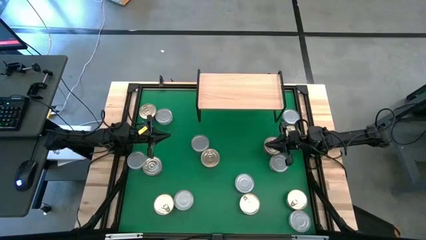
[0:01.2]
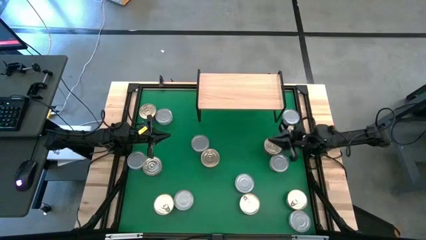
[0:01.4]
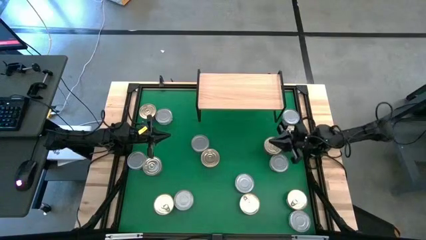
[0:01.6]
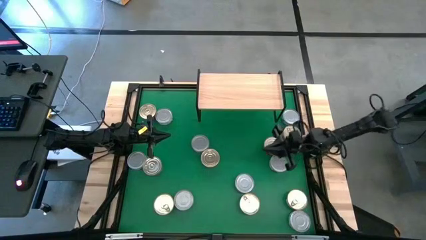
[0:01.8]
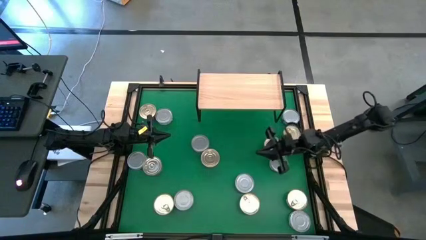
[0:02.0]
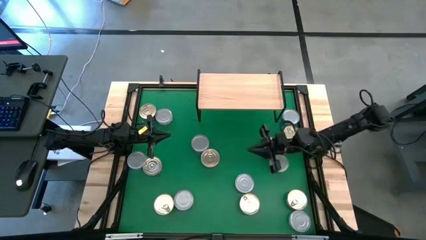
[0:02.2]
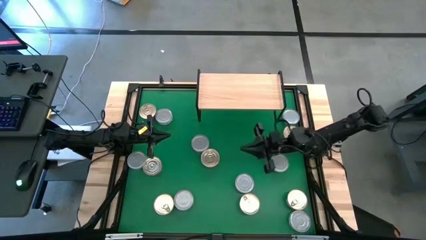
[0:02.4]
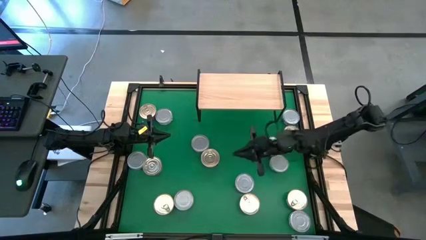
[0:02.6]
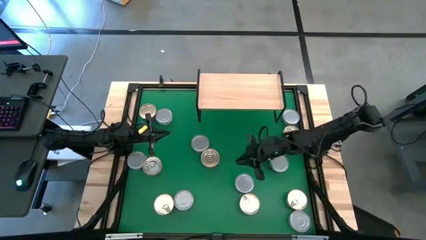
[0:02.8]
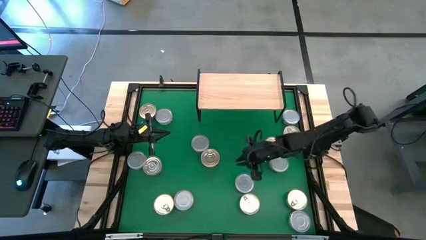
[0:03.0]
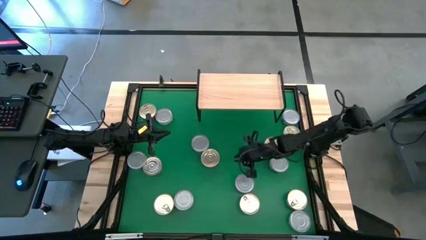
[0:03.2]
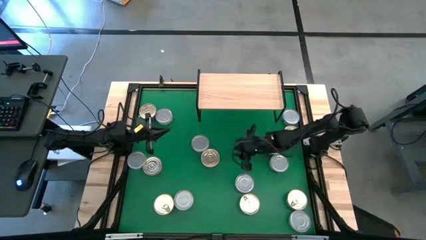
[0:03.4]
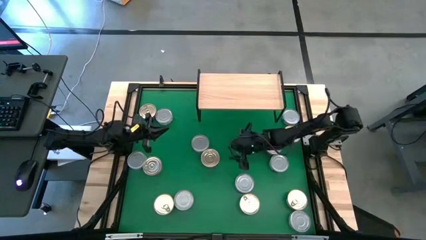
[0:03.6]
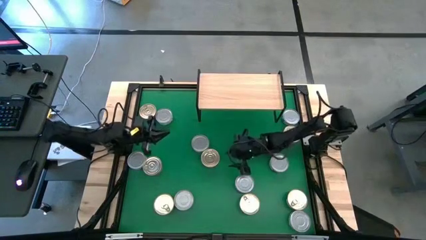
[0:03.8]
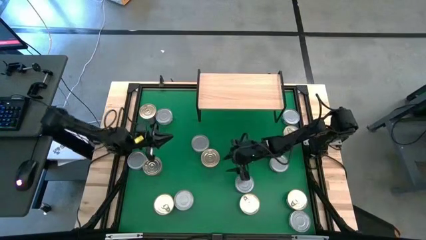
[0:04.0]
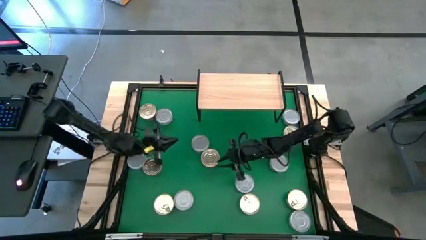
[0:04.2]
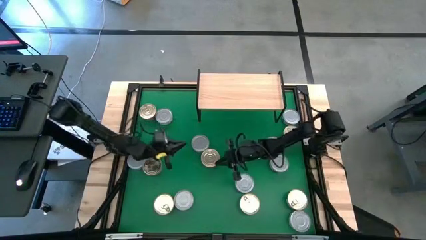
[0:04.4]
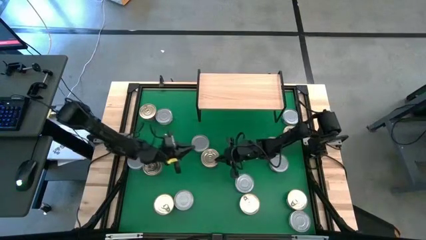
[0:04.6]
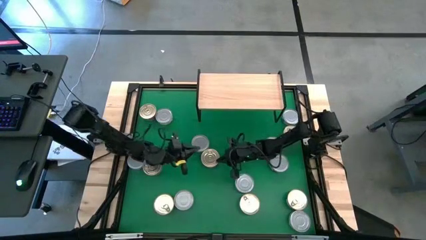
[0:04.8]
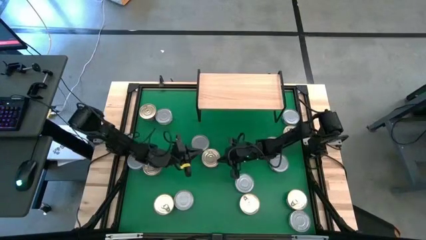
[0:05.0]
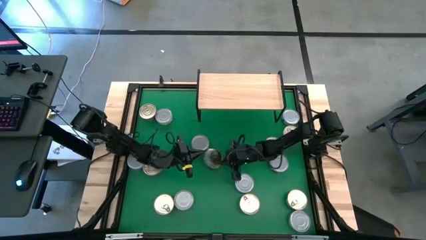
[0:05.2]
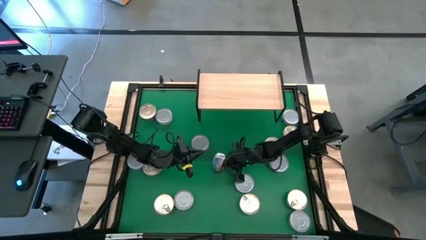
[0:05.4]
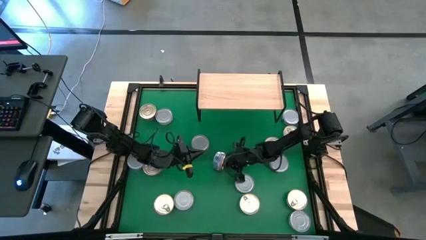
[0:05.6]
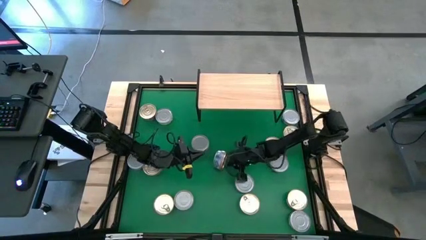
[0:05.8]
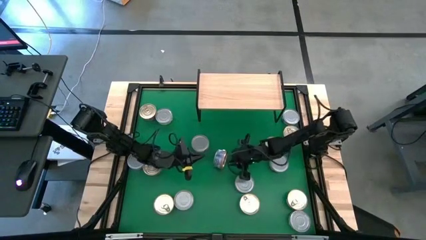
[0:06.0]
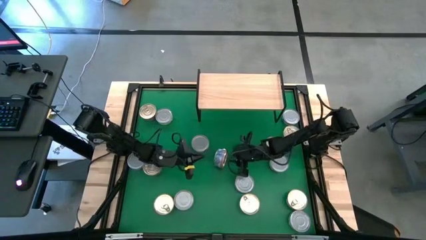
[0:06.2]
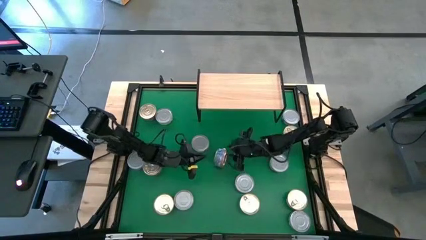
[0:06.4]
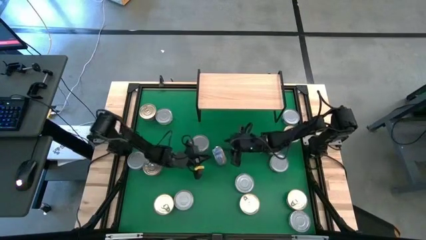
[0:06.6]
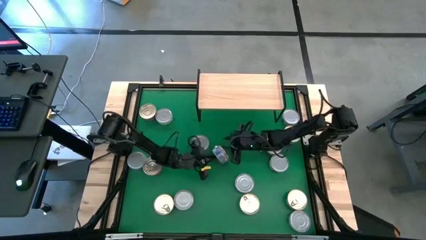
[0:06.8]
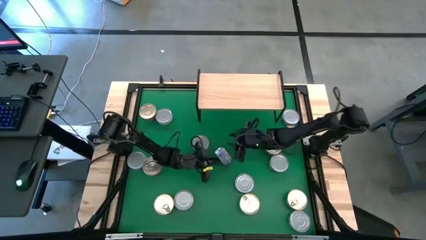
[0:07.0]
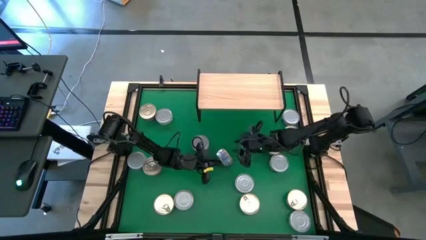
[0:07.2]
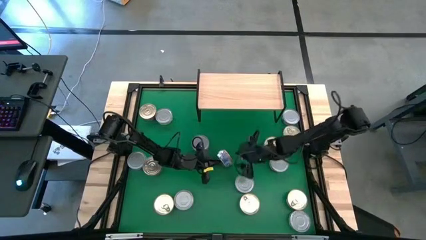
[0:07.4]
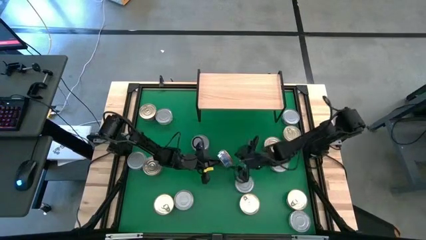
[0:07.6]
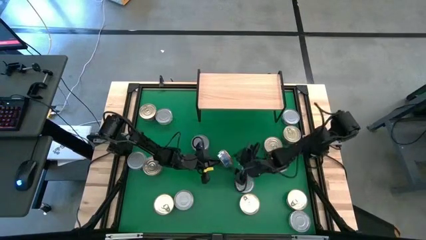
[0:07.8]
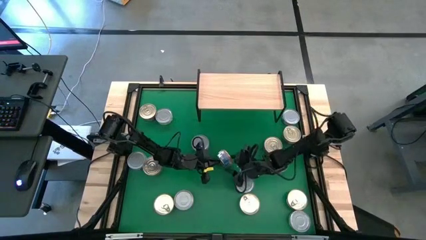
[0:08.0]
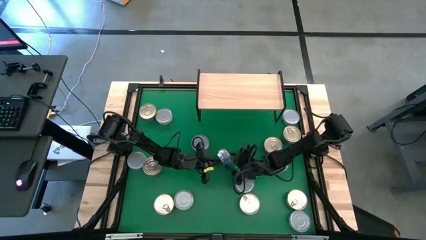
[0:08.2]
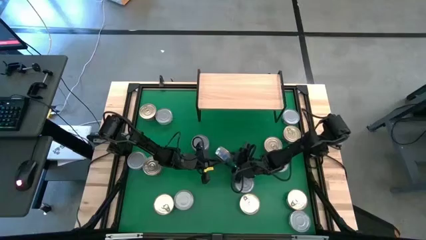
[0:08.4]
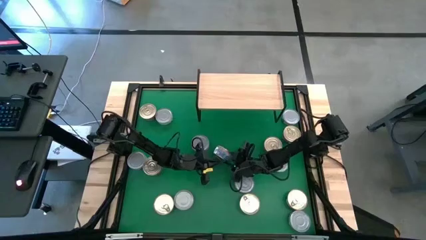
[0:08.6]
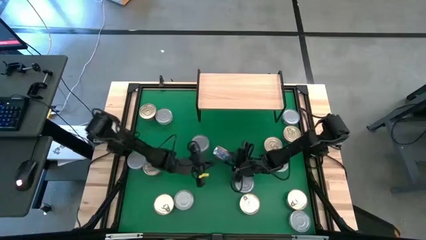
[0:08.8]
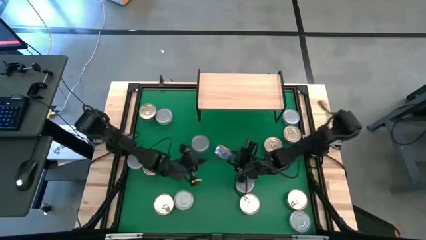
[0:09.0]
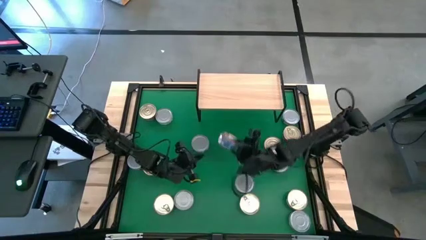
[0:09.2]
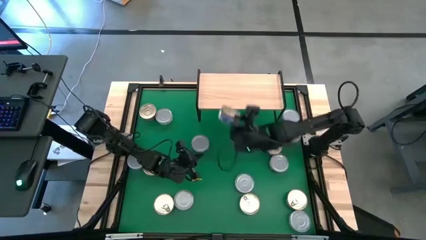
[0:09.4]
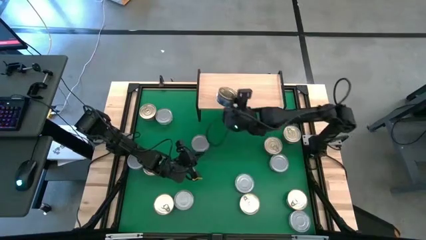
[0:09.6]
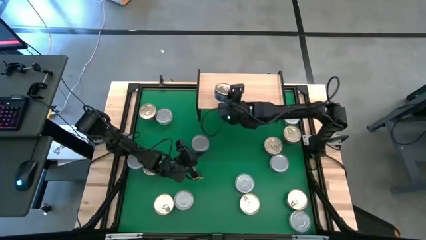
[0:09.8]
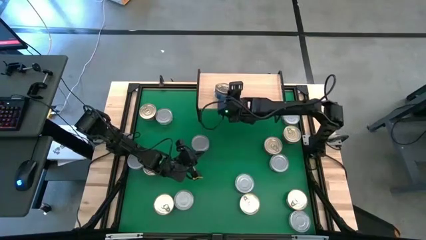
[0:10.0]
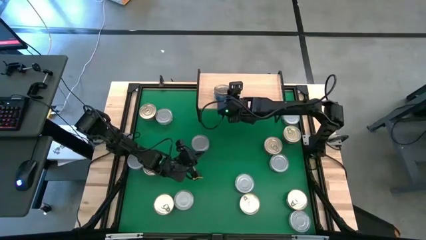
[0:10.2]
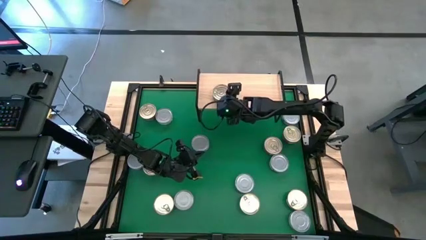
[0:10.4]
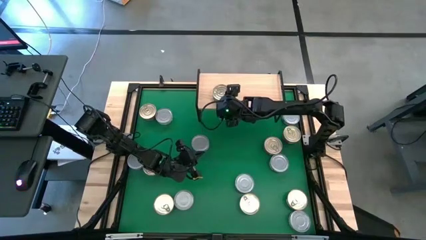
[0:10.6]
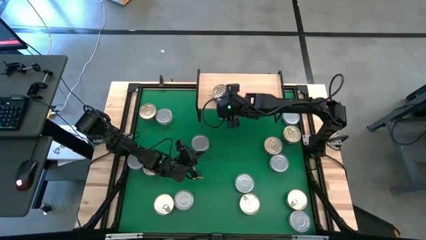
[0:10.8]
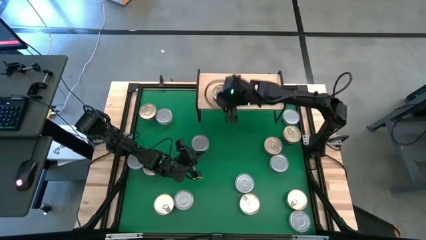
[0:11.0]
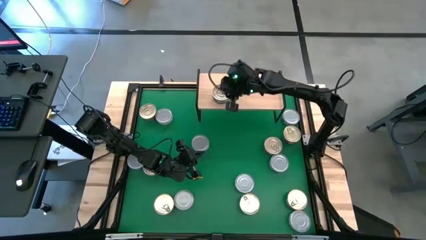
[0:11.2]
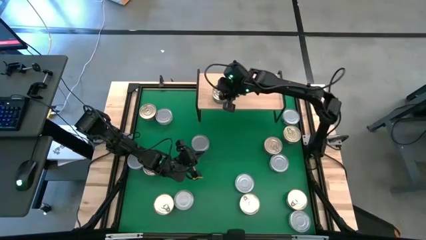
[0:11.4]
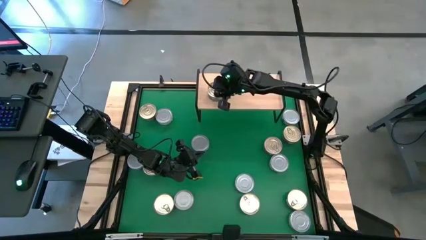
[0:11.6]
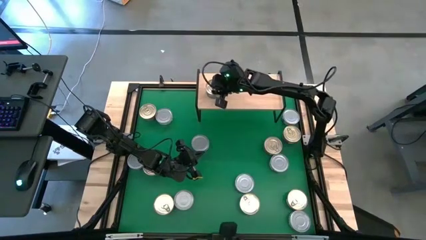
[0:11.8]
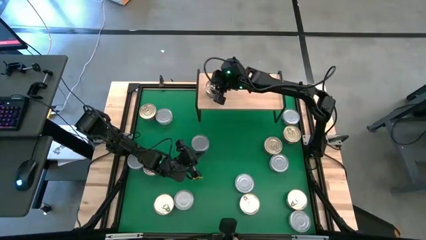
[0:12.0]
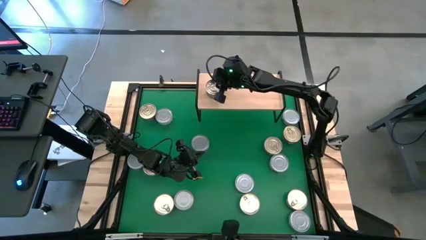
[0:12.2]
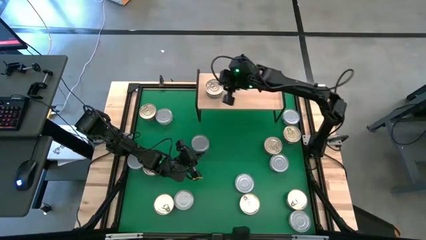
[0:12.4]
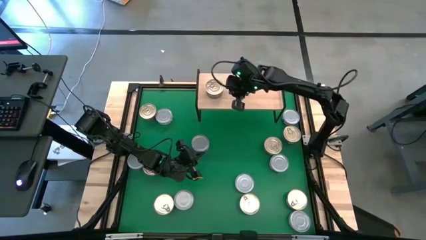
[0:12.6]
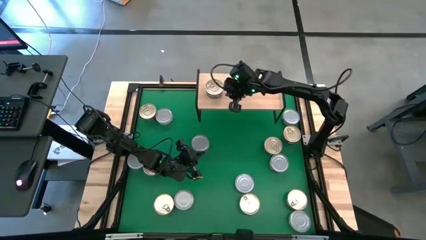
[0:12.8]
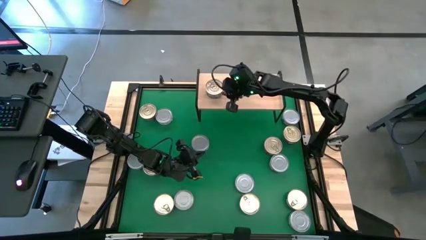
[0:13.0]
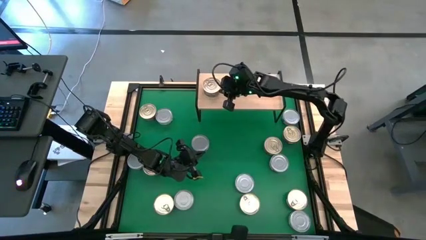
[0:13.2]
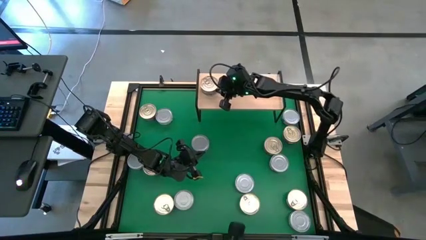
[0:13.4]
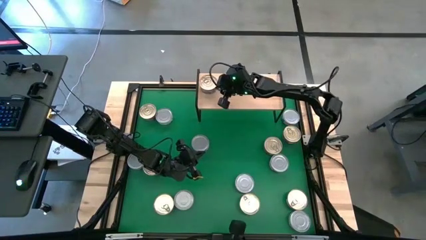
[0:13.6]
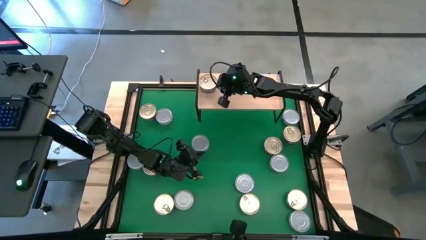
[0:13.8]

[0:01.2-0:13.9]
Task: Stack canned seafood by type on shelf
Put the blue pink tuna can on the shelf
